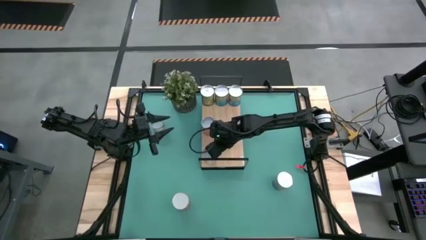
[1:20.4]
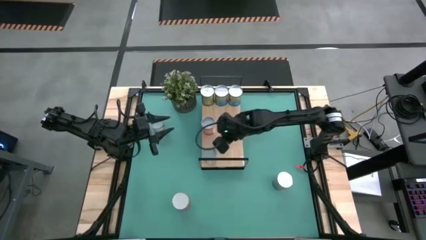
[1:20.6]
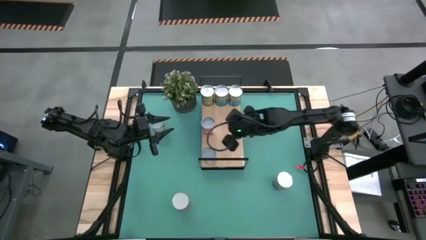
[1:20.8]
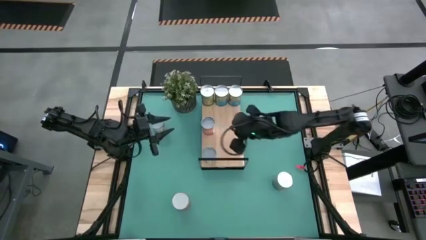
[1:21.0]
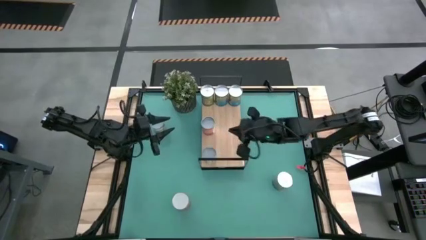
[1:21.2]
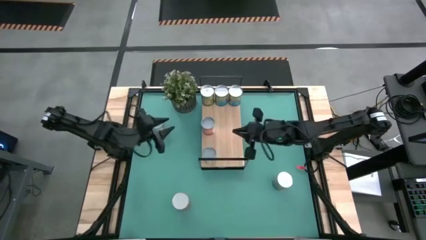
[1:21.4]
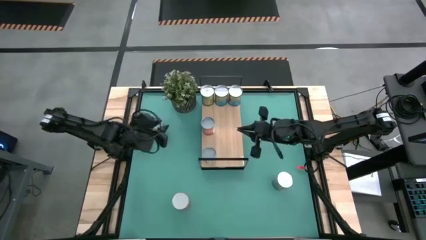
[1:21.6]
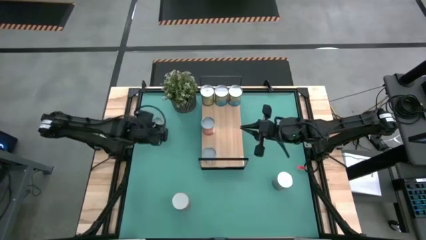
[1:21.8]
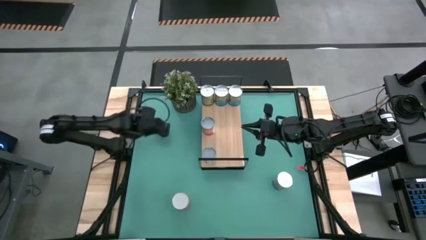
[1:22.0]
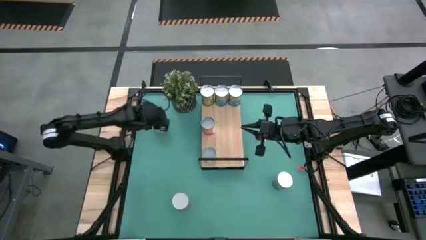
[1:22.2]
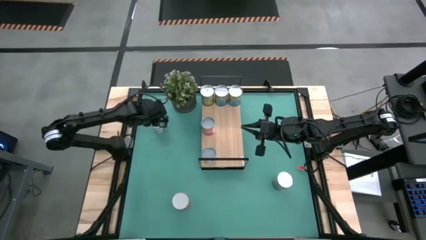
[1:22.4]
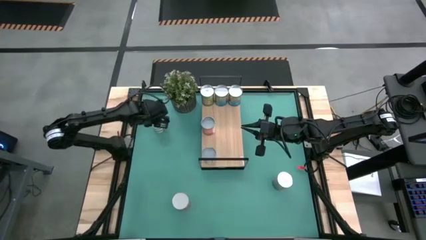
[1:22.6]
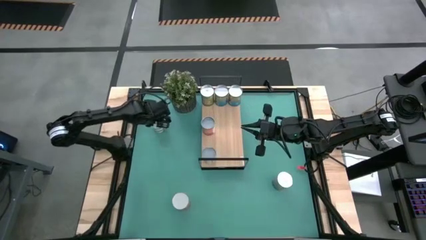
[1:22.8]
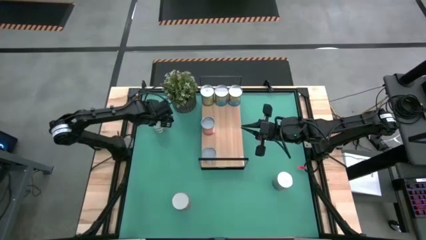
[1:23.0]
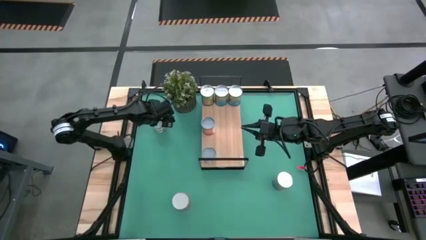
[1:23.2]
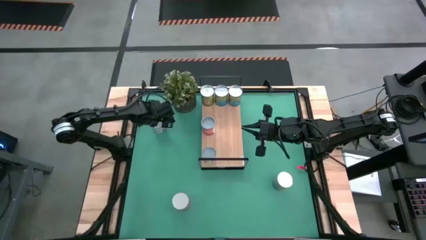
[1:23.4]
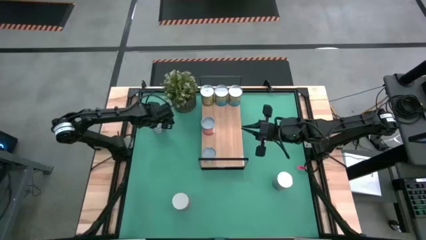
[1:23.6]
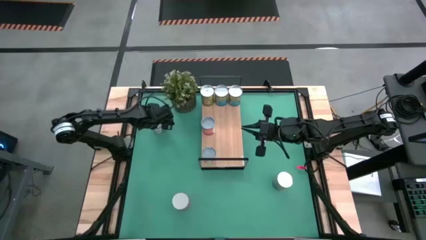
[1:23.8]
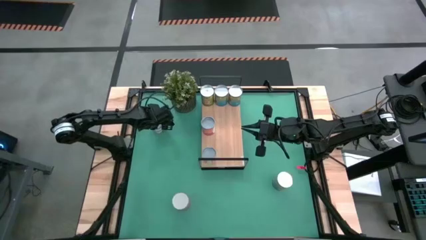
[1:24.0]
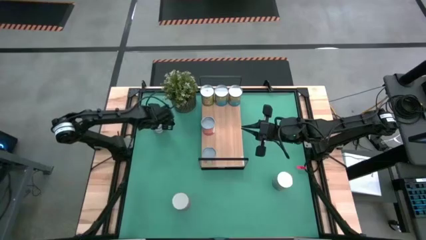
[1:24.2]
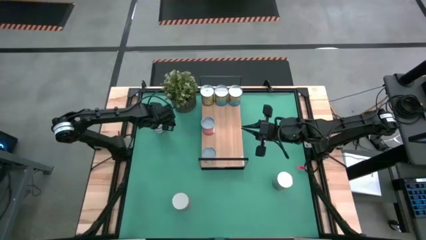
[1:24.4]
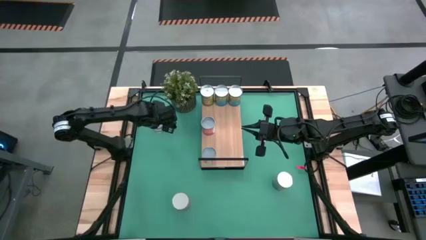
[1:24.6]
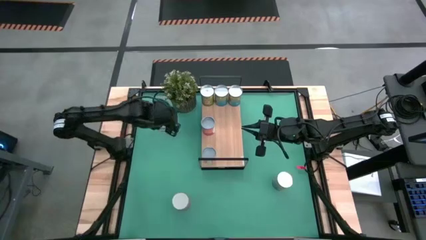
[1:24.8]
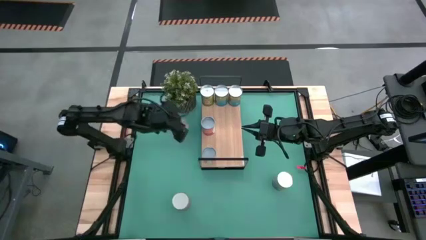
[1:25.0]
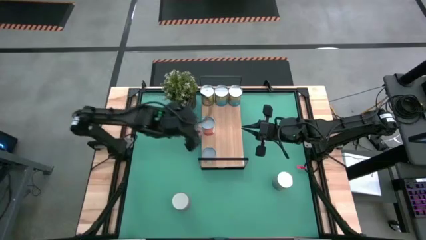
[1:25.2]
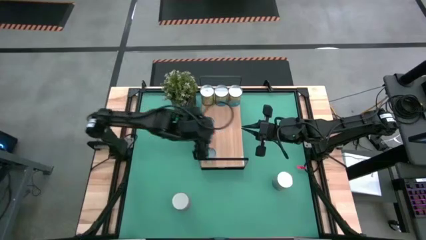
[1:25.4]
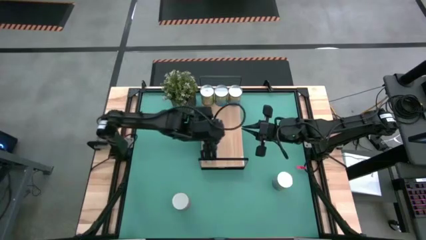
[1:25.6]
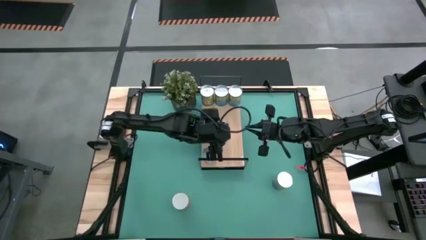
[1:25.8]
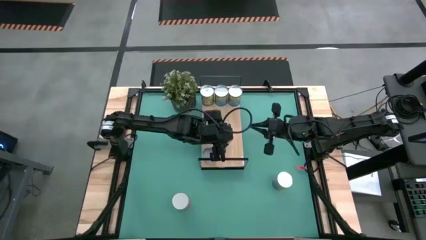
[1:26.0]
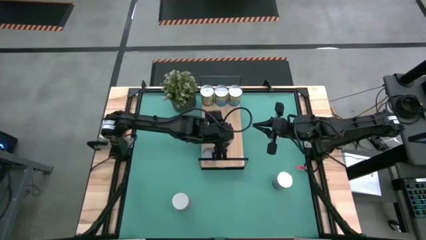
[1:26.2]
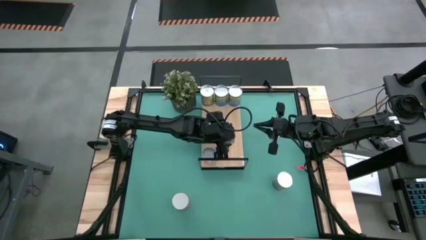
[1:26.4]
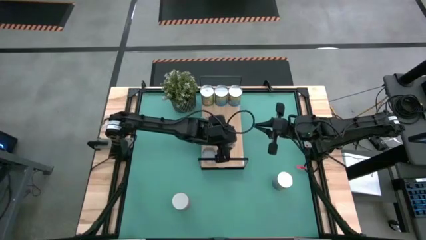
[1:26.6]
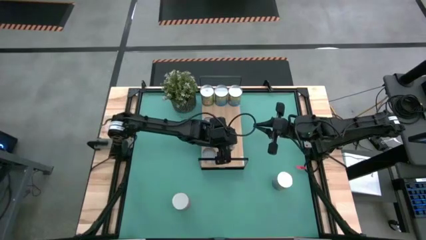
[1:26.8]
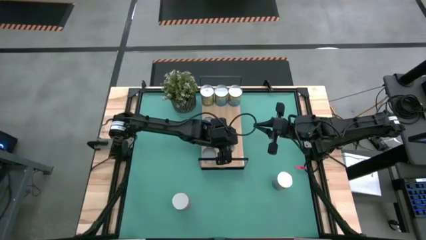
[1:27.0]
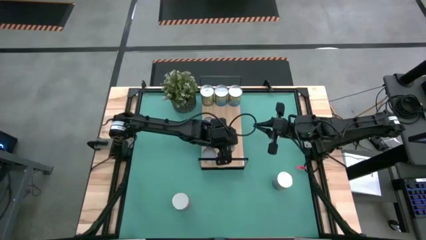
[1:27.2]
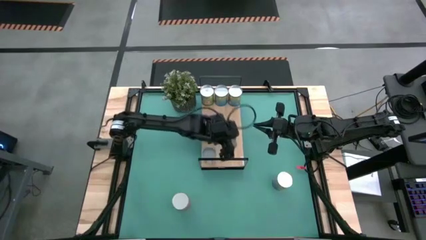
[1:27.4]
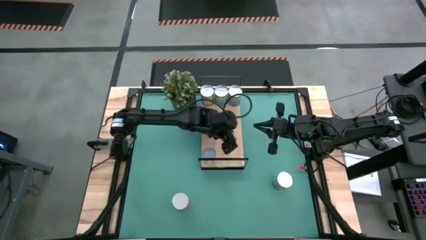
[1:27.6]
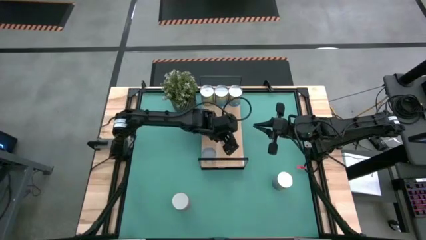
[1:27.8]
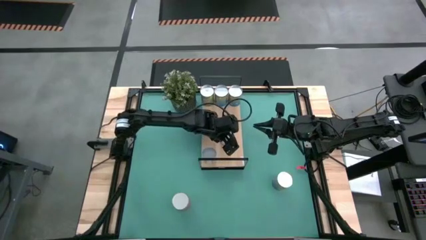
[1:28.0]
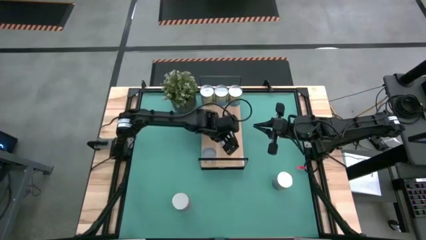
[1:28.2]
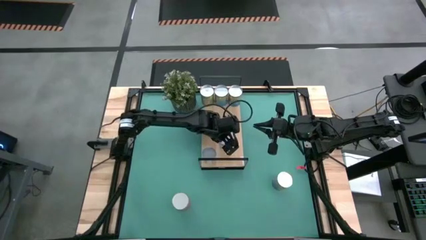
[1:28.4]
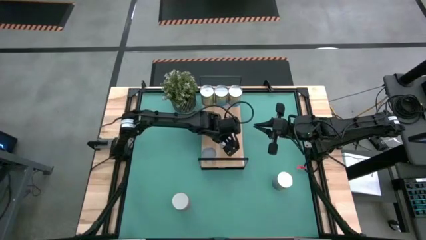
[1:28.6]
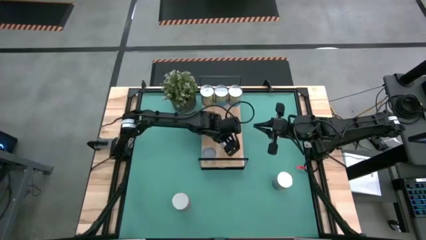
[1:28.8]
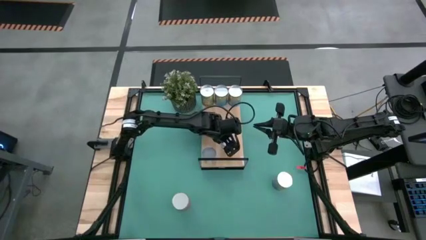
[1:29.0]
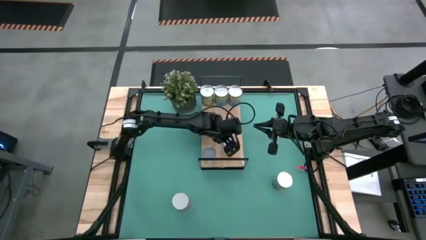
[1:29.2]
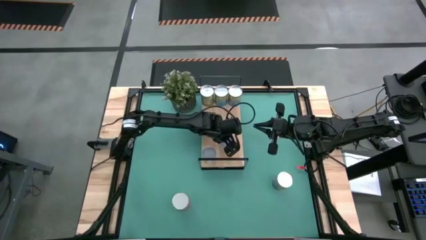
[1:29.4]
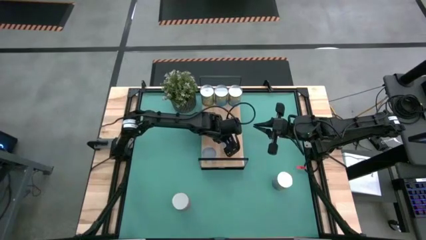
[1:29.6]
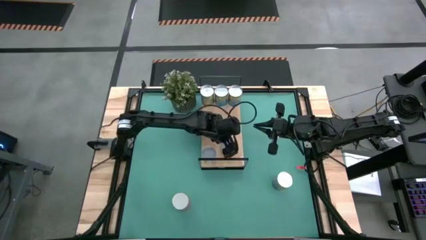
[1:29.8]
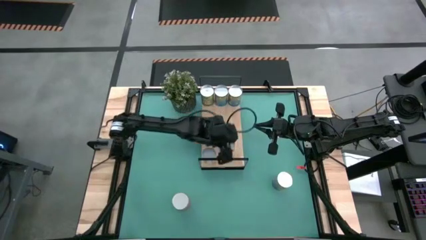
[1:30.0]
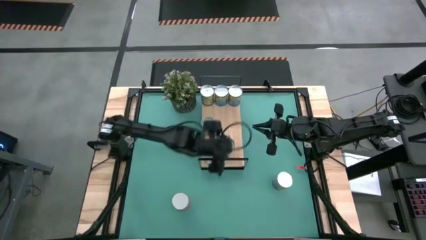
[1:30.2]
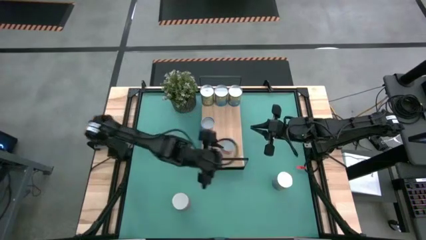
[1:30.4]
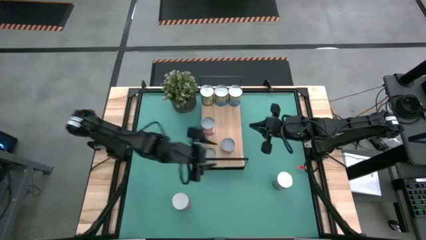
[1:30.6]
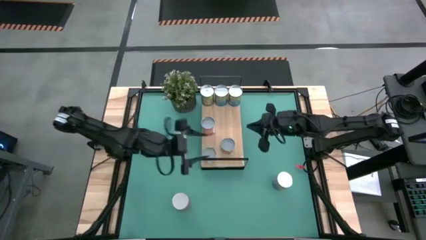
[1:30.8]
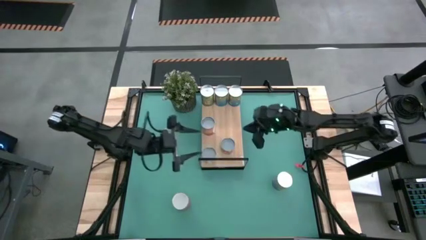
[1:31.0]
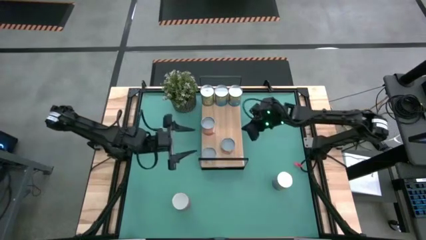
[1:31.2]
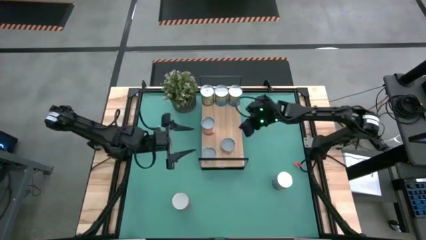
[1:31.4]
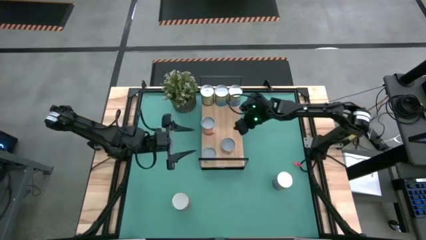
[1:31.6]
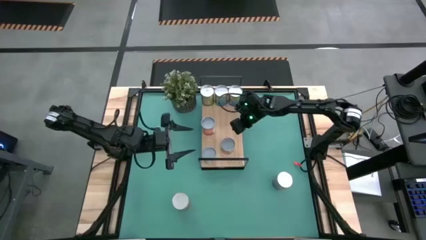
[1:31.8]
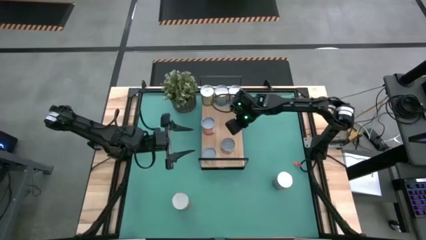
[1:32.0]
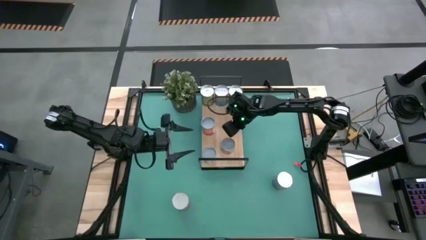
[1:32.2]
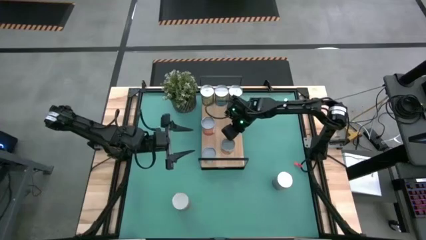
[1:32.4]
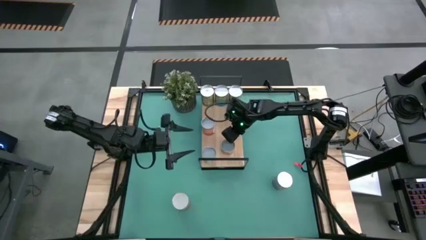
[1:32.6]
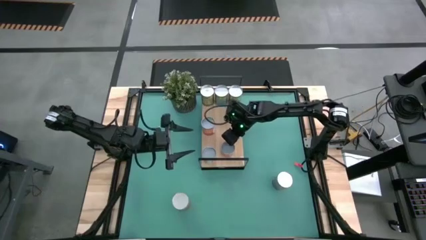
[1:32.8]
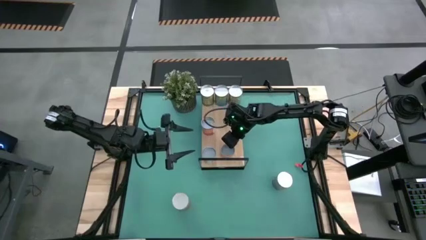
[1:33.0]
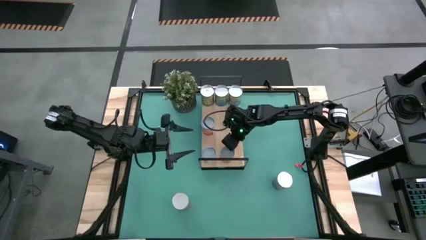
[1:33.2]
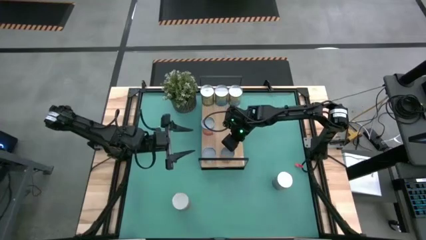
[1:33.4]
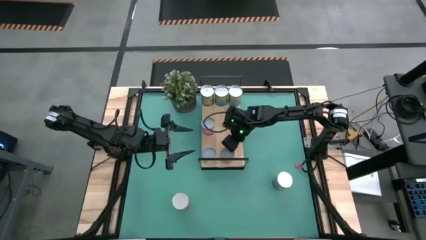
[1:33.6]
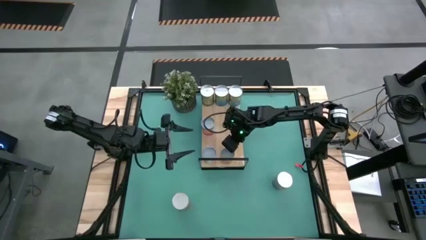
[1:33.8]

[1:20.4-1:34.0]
Task: Pick and place cans onto a shelf
Put the canned oranges on the shelf

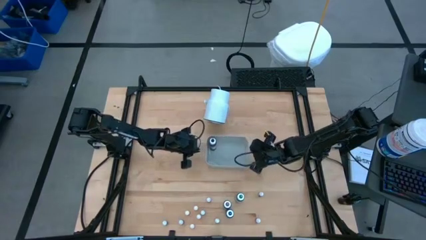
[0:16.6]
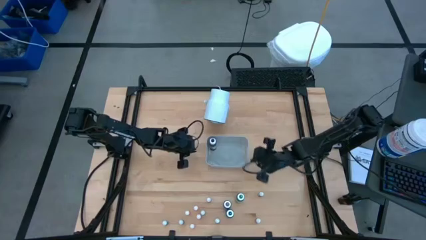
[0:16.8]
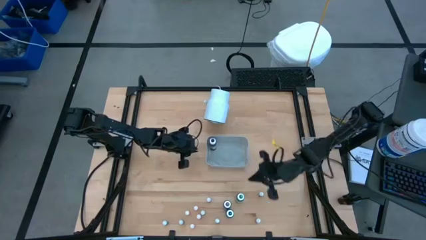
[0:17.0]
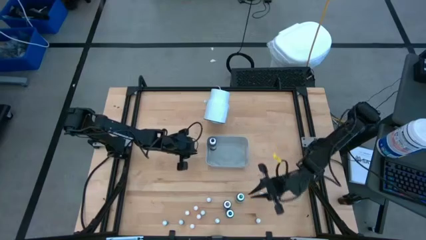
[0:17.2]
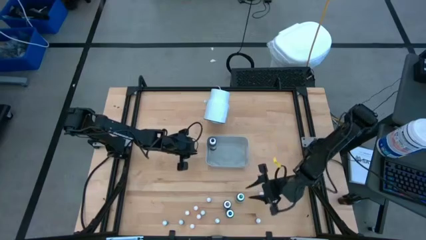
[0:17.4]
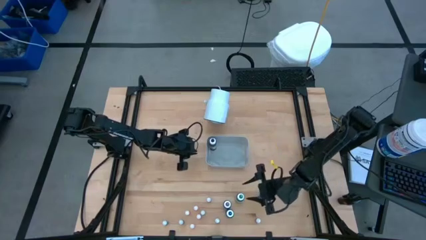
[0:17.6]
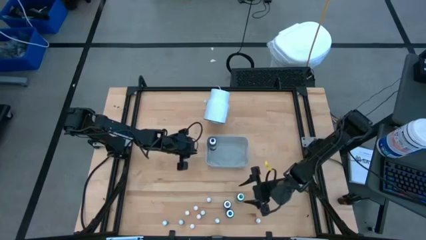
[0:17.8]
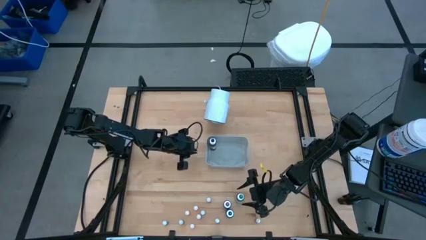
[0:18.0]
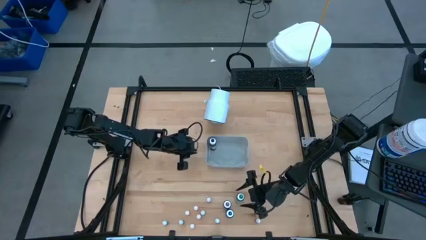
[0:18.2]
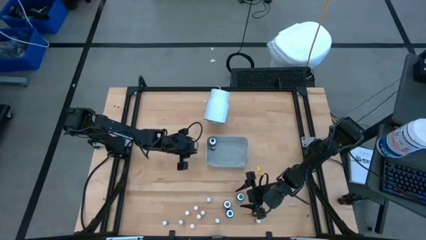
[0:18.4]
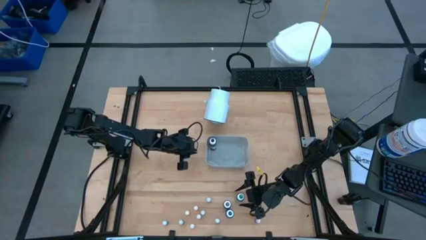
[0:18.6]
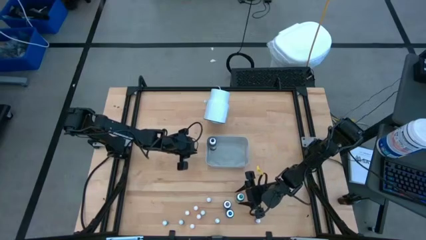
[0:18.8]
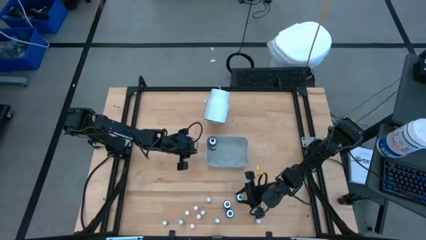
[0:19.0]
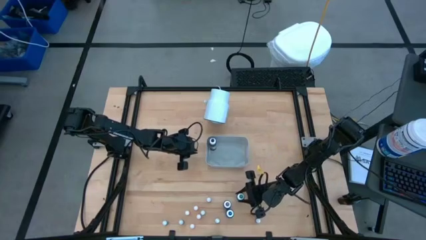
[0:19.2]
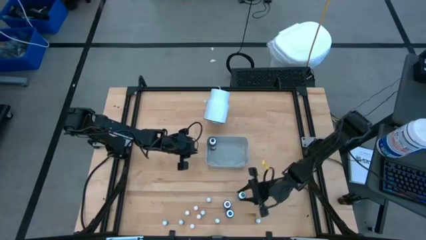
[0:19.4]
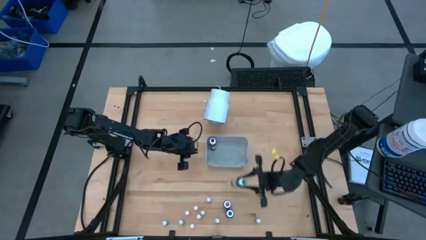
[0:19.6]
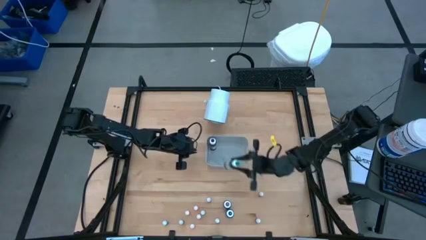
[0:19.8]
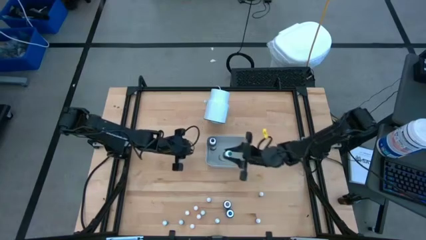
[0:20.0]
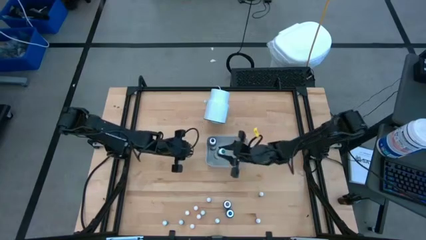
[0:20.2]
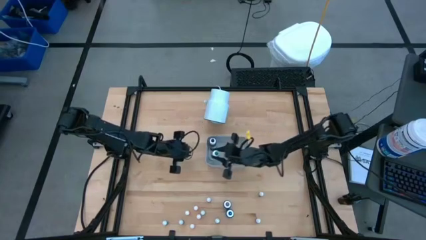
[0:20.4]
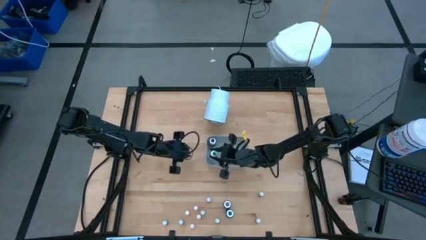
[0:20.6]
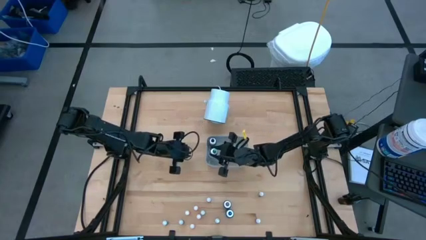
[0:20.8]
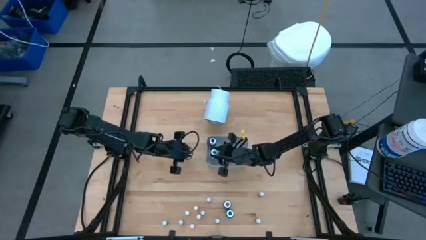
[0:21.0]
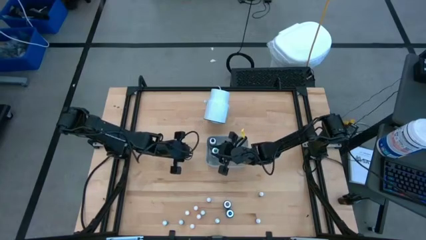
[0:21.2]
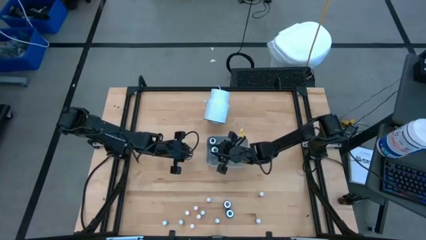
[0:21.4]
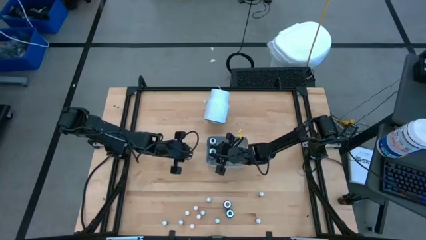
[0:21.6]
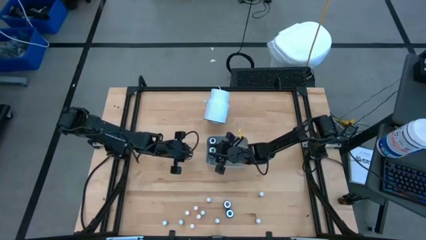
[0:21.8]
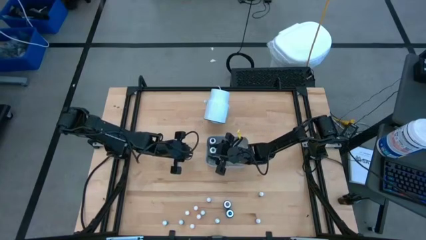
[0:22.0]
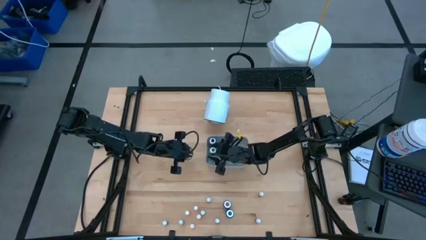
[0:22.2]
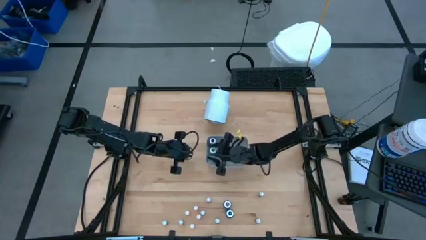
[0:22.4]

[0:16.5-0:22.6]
Task: Pick & Place food coloring
Put the large green food coloring bottle into the gray bin
